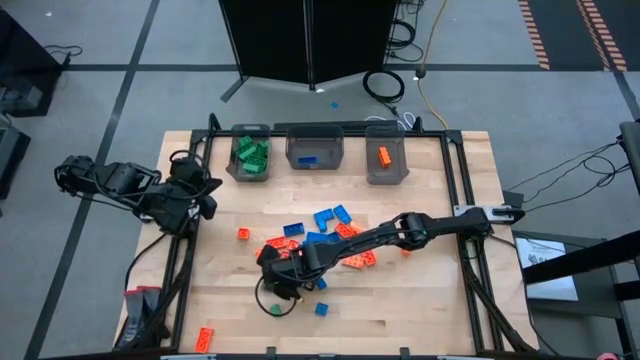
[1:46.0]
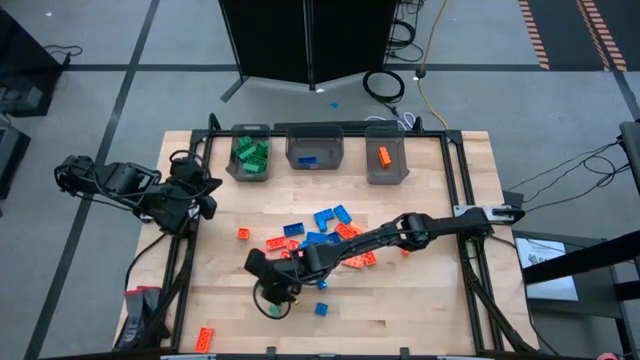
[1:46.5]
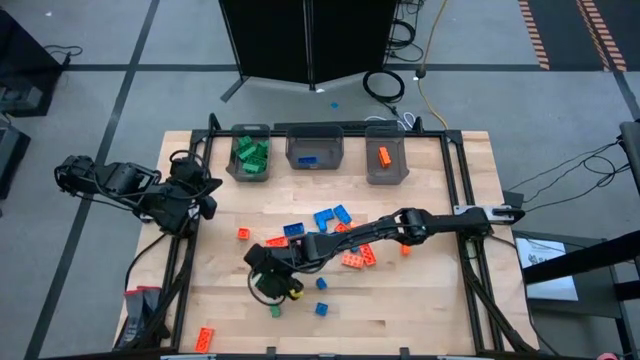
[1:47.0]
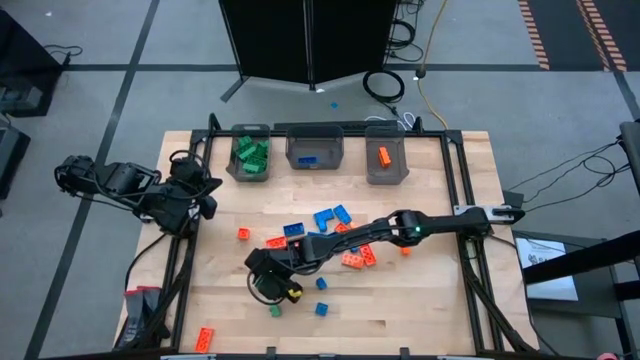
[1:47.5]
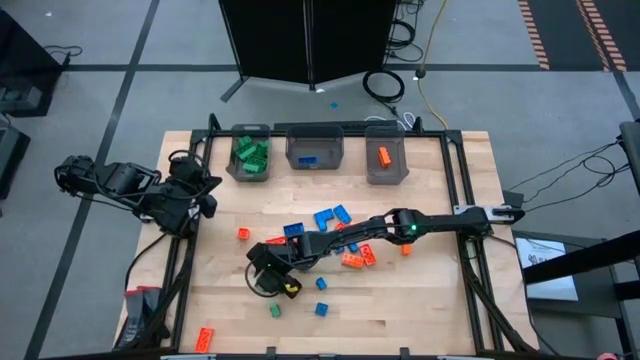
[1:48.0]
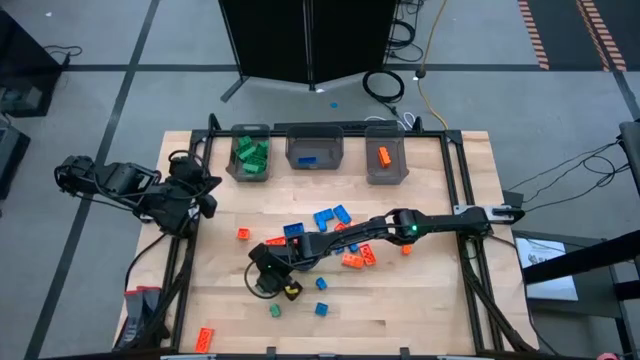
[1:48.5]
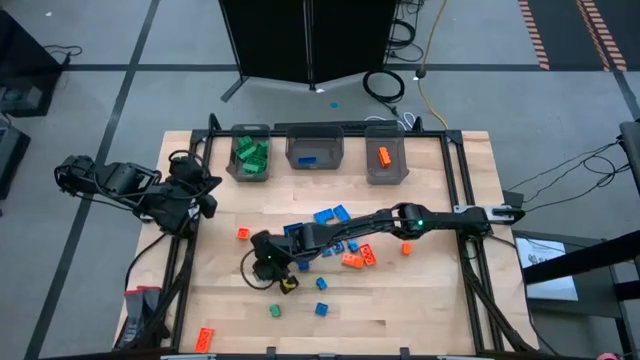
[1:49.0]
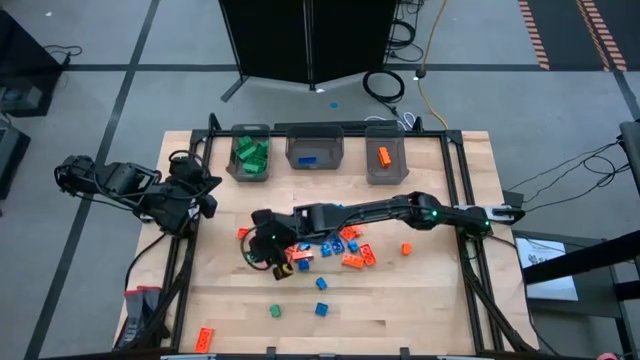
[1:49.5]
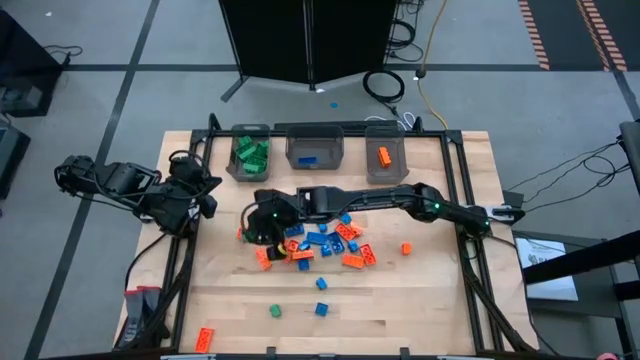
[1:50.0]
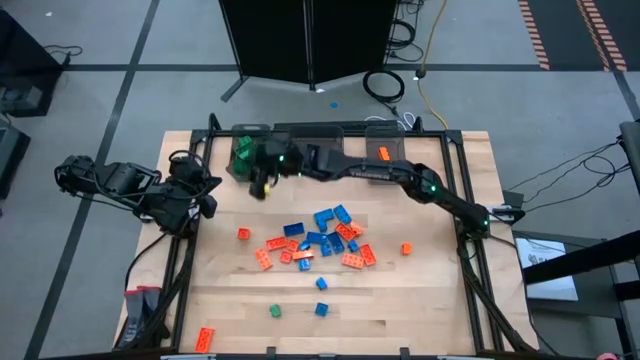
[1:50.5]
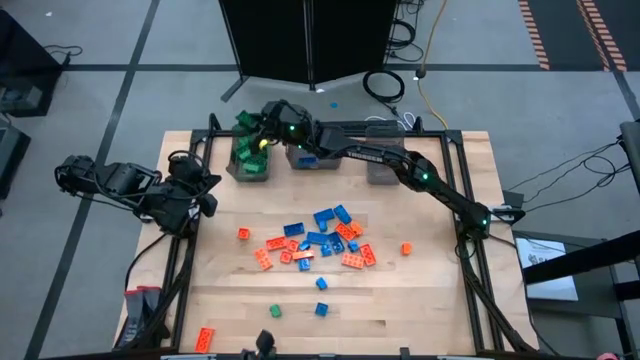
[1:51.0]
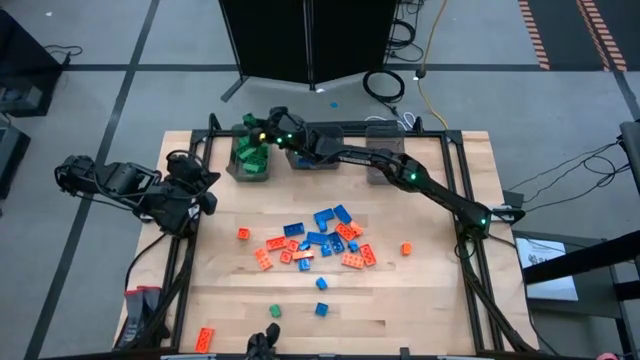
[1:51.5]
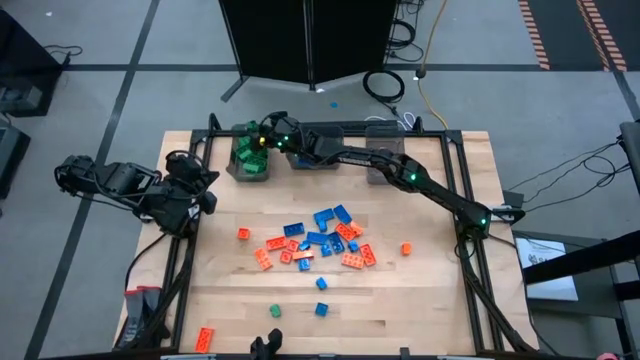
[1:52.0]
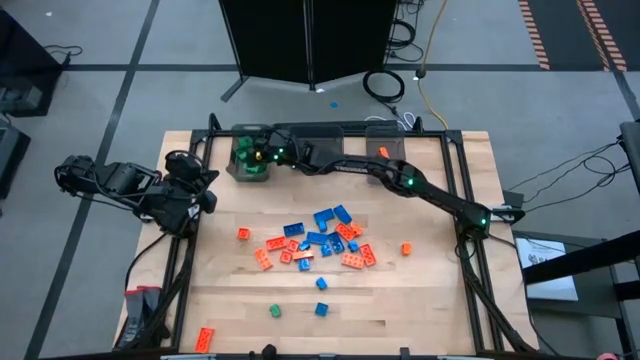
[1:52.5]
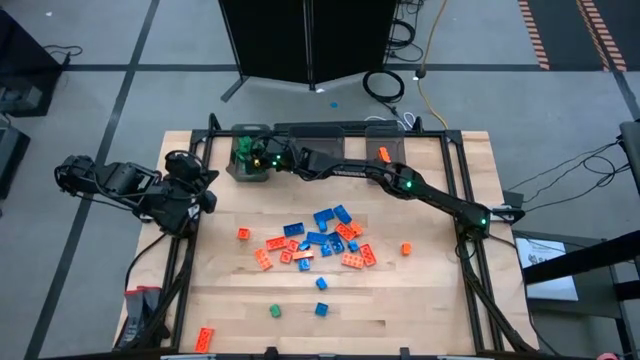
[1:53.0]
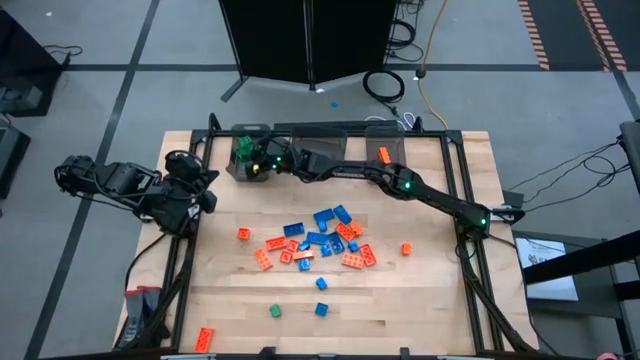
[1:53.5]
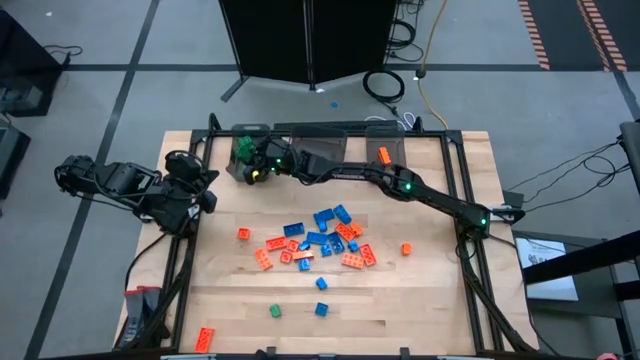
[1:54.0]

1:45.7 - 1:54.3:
Task: Sort blocks
Put the green game piece into the left black bin

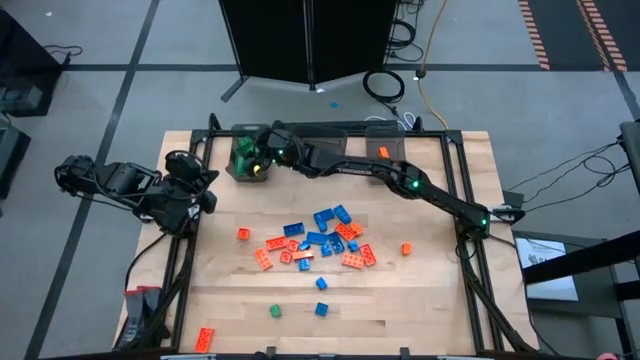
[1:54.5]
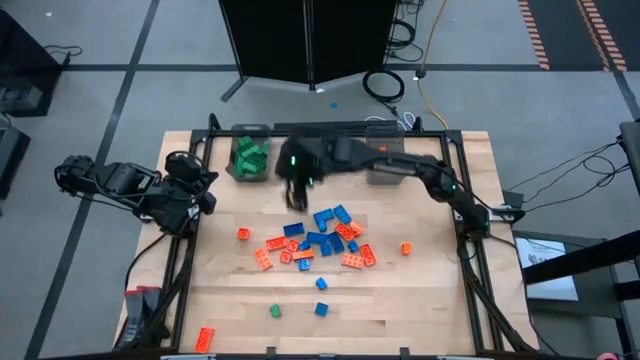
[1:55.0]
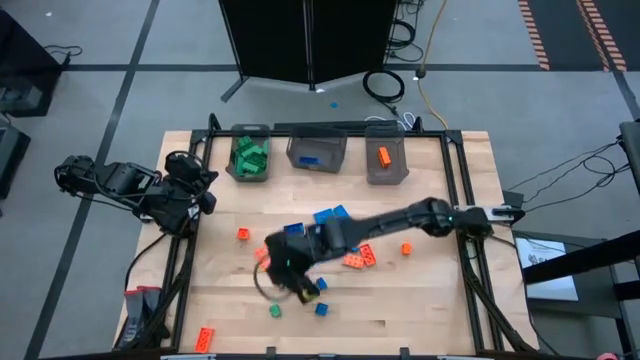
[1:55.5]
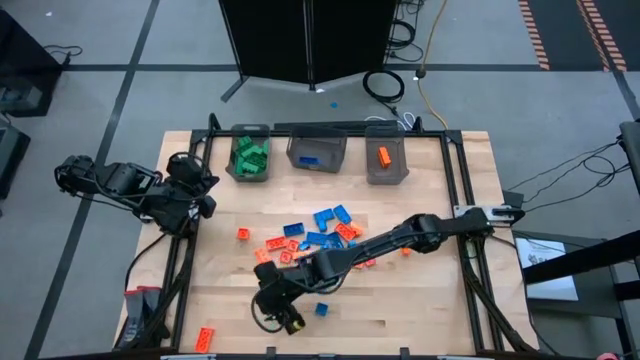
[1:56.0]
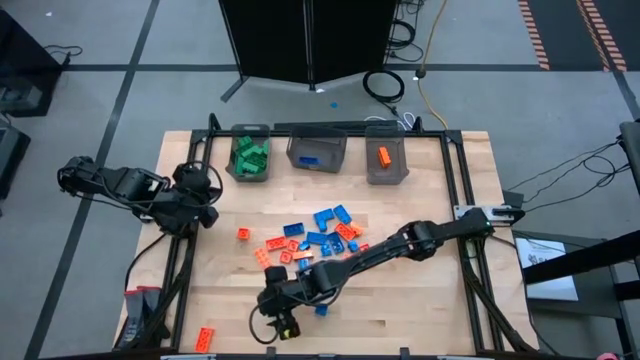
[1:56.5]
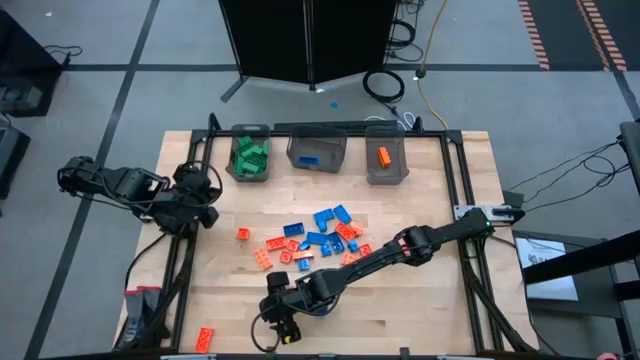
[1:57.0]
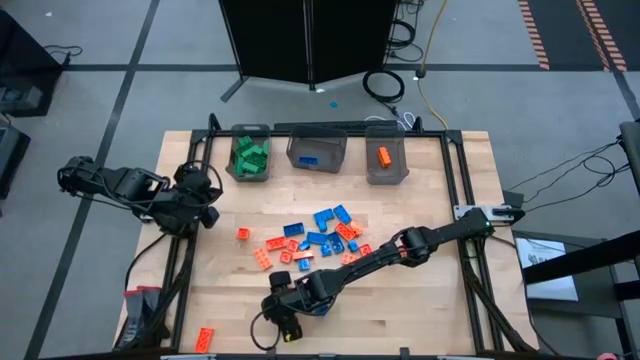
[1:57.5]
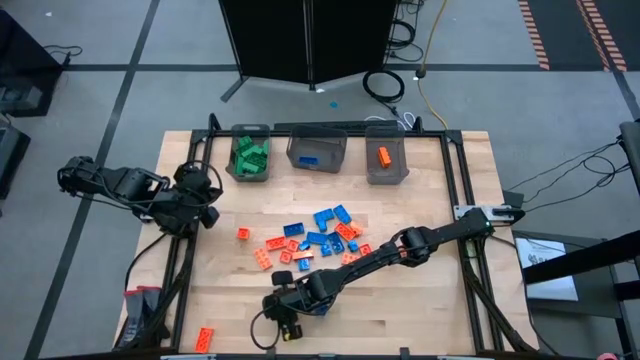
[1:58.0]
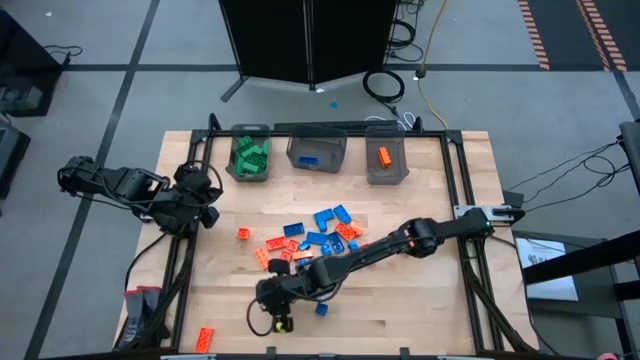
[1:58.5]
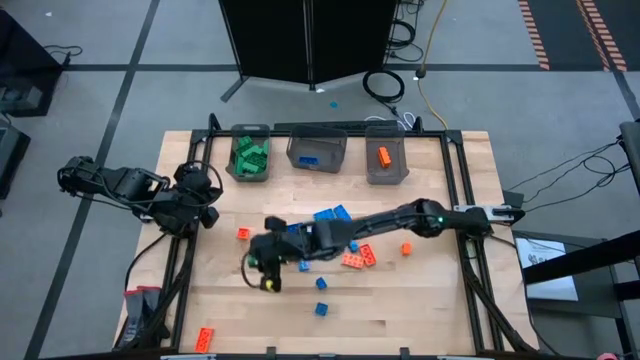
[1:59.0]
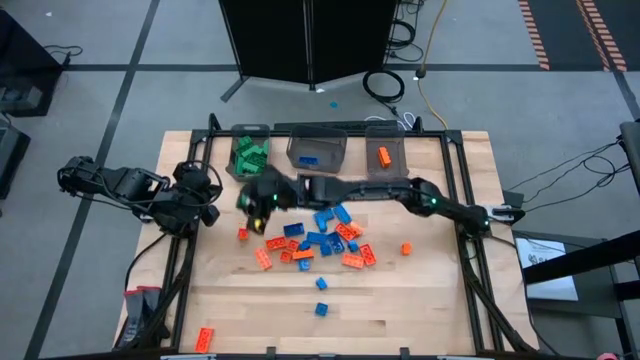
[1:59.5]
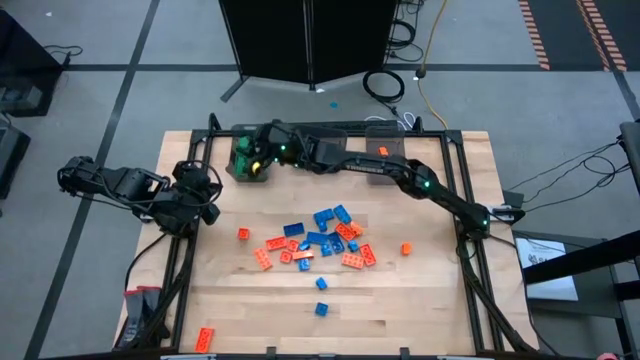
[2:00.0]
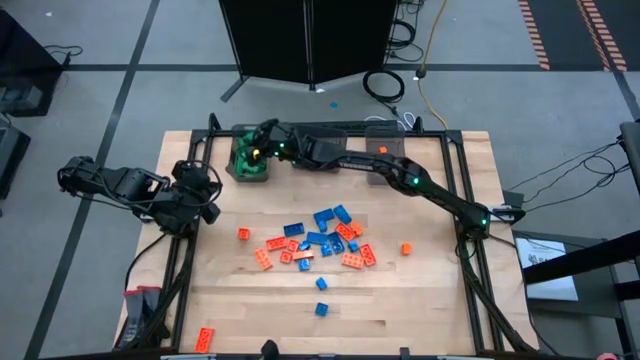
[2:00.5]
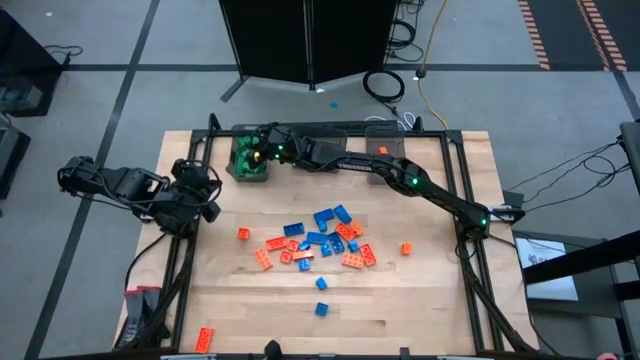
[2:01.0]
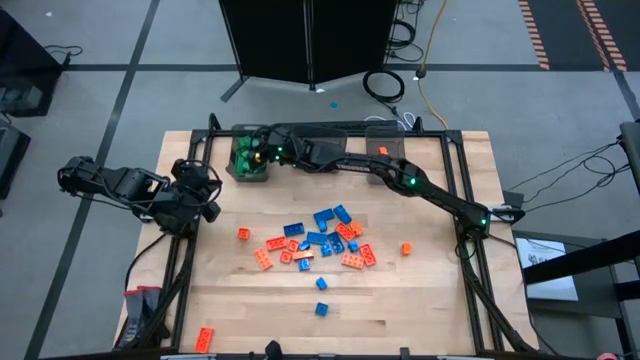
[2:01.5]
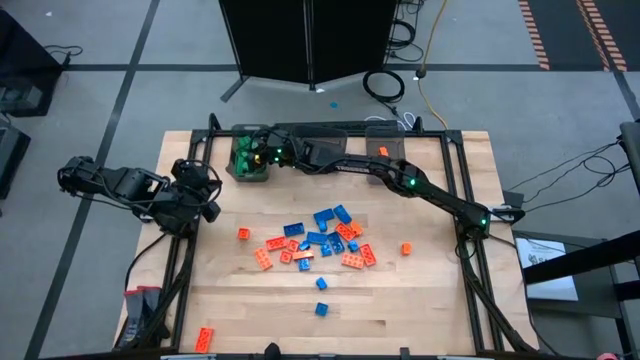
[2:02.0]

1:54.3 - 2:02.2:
Put the green game piece into the left black bin

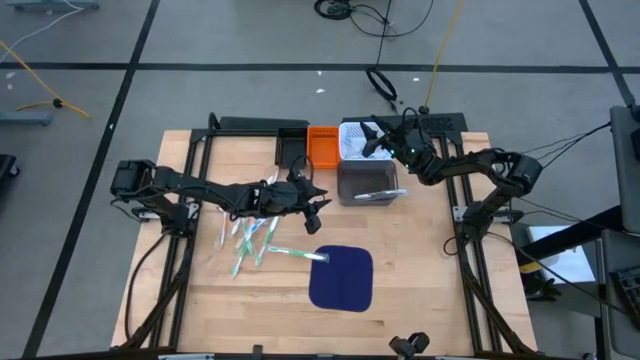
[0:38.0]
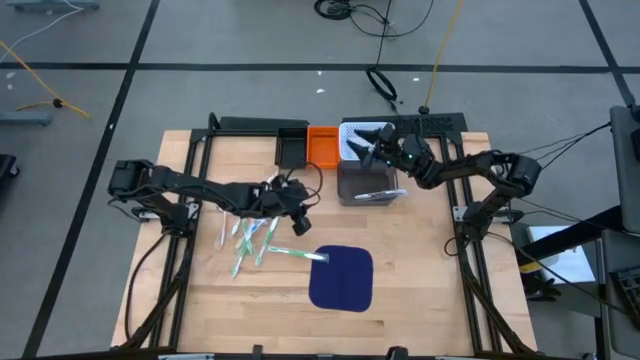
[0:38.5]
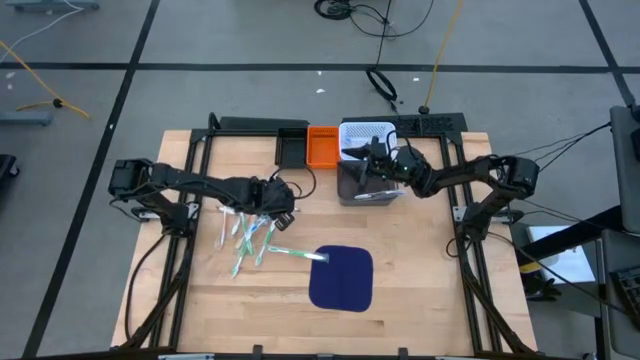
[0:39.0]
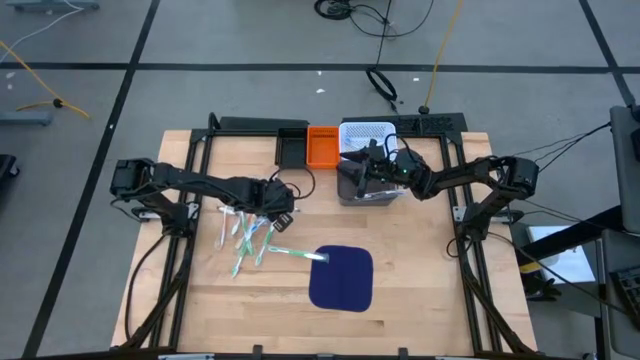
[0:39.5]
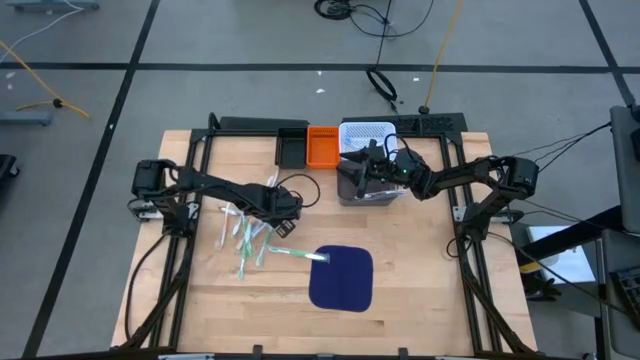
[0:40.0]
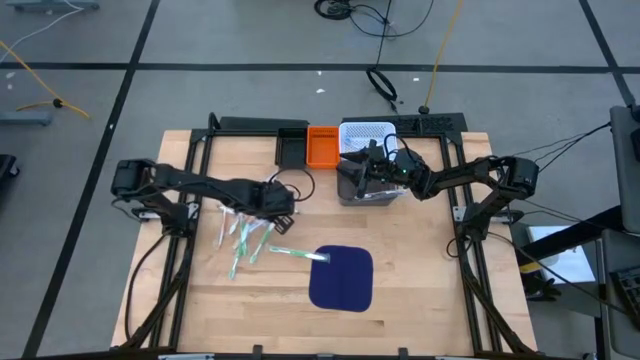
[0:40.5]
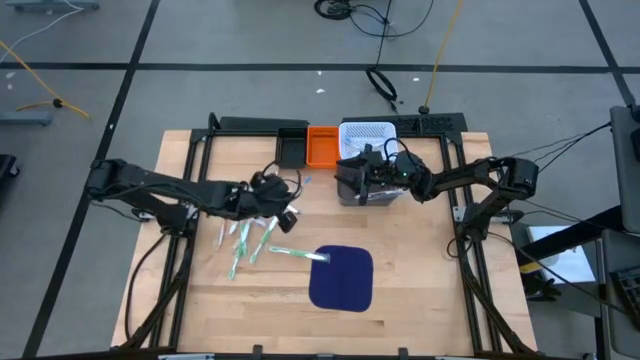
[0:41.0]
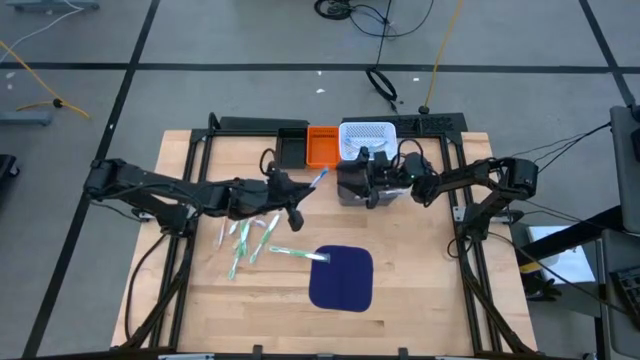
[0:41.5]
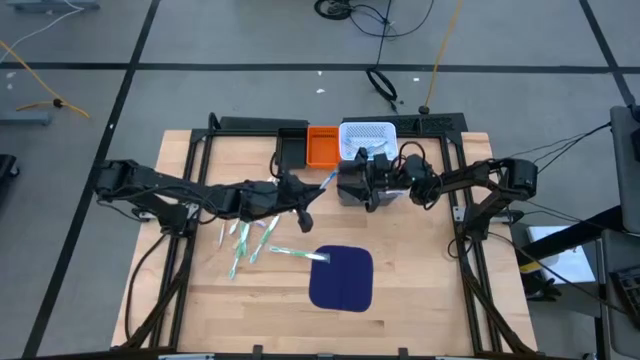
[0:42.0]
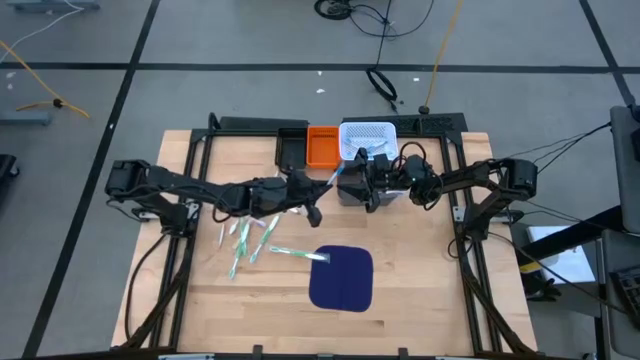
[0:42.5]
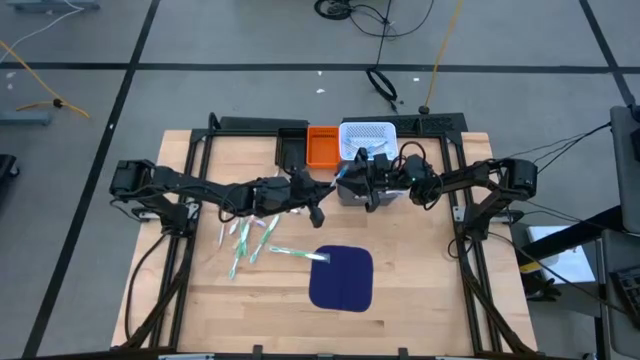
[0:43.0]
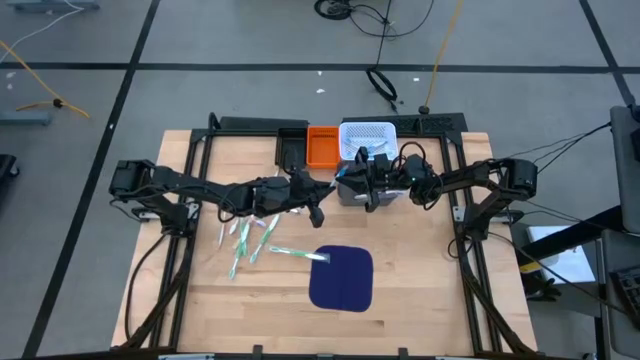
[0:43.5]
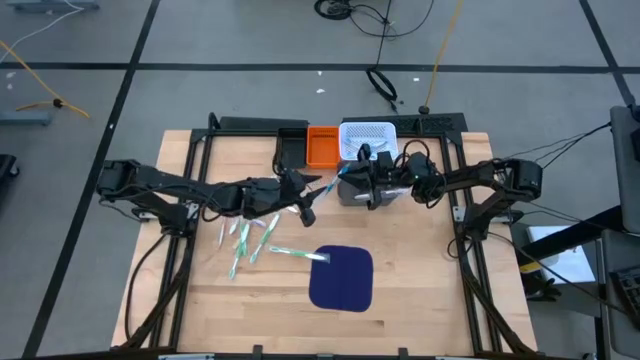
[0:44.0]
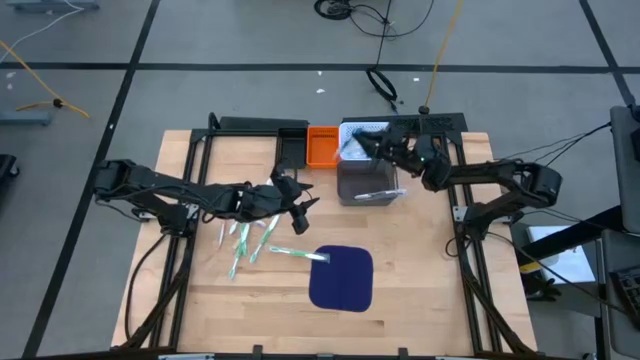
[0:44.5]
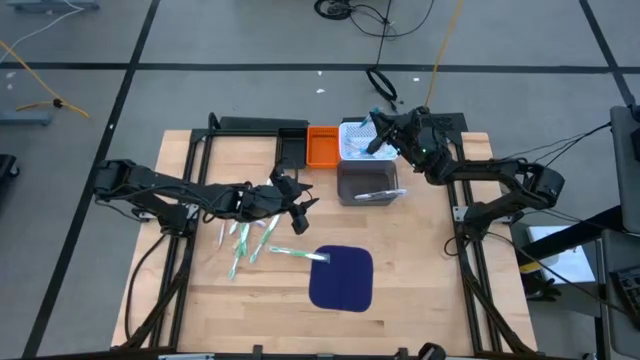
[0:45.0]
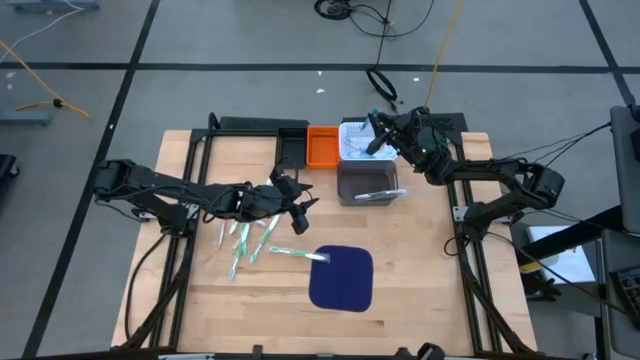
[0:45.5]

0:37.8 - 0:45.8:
Task: Pick & Place Toothbrushes
Put the blue toothbrush into the white basket
